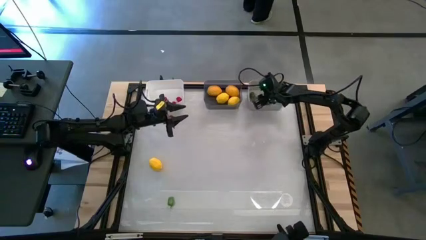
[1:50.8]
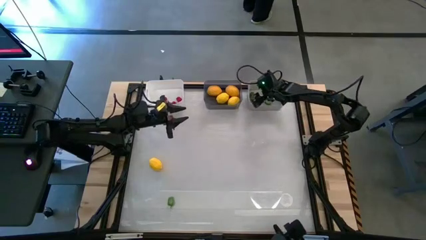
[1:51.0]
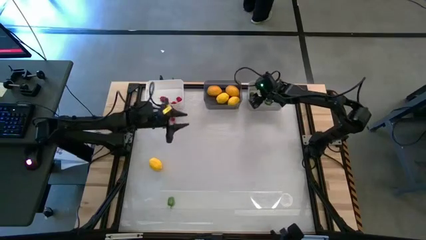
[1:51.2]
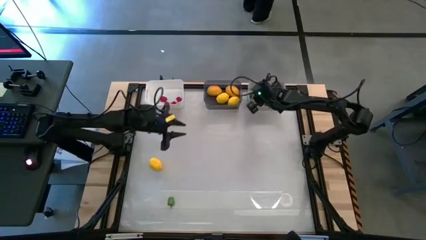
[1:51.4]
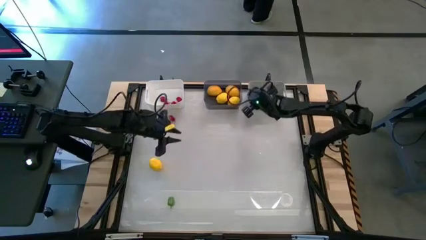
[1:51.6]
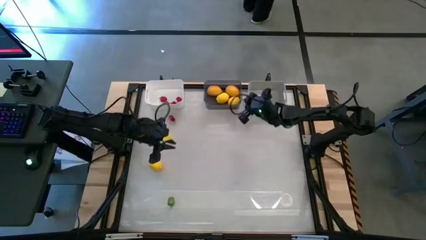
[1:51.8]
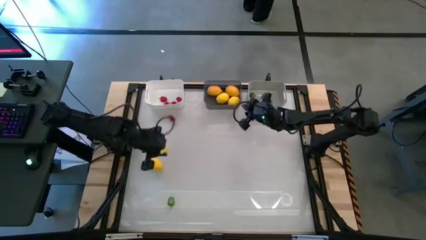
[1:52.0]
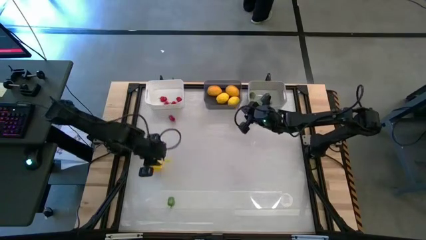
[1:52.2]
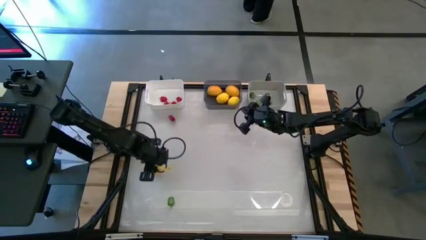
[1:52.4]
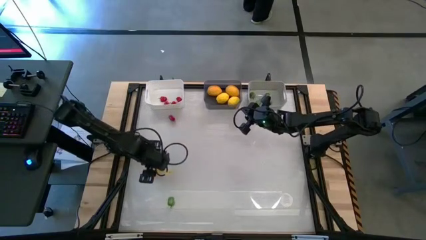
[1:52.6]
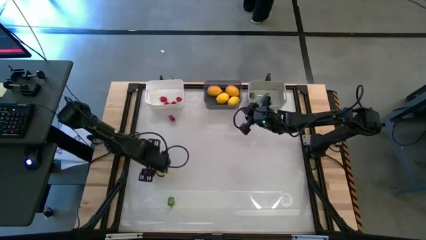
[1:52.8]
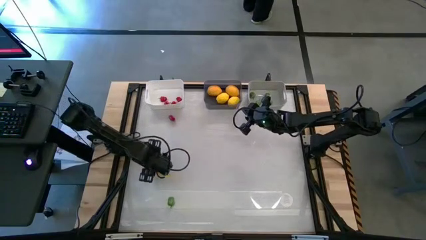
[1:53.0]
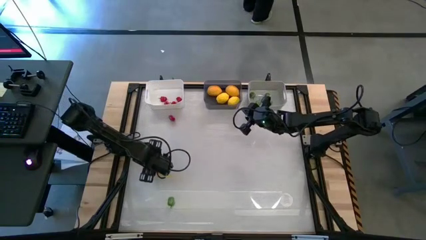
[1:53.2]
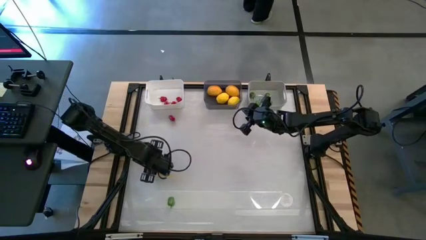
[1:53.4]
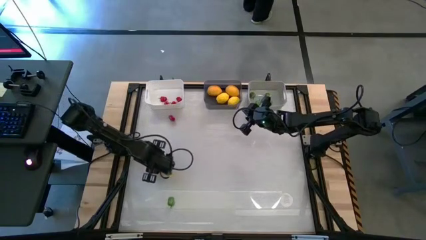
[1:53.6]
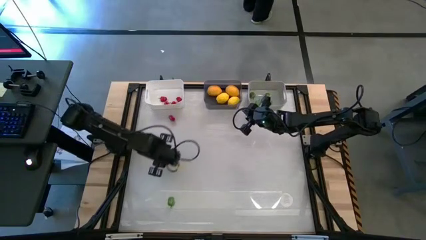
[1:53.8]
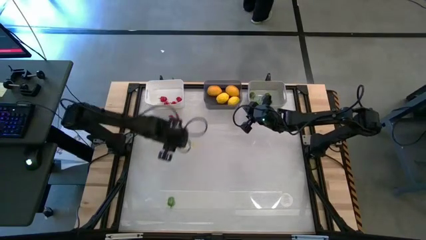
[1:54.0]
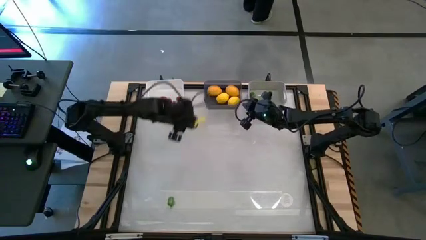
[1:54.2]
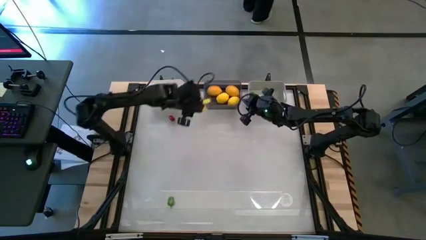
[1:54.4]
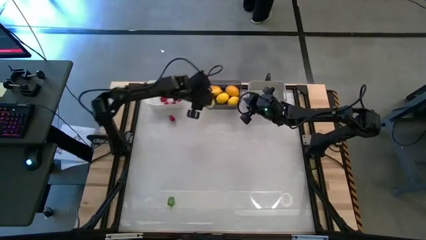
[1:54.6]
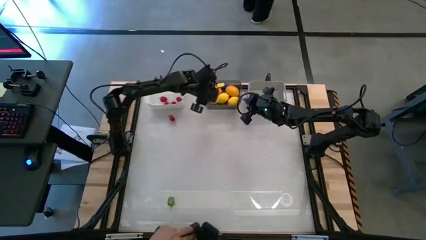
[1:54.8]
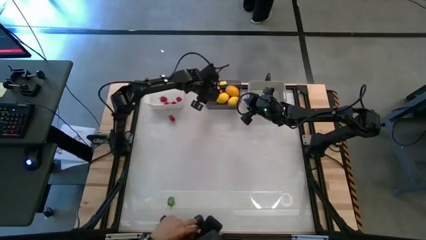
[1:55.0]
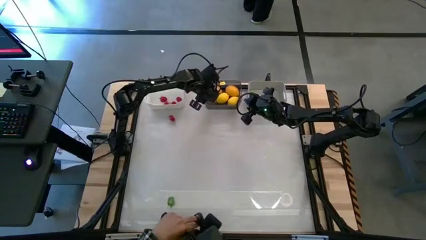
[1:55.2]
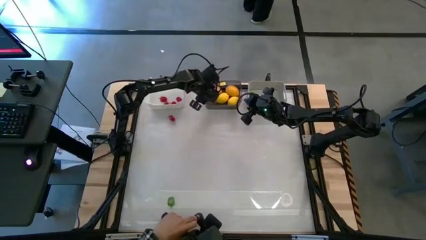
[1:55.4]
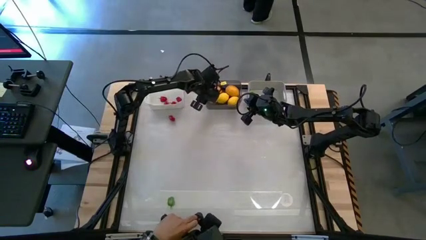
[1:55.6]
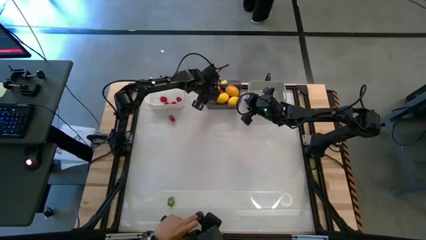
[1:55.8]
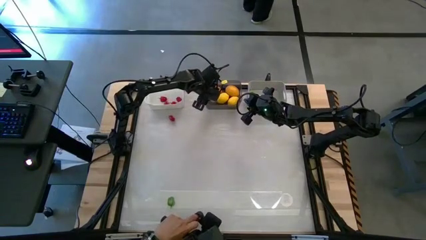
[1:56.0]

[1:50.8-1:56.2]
Task: Sort produce into baskets
Put the lemon into the black bin

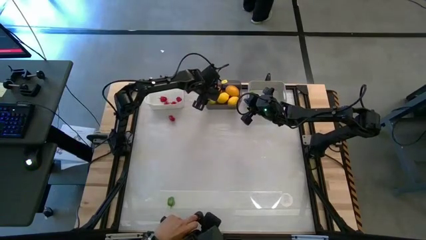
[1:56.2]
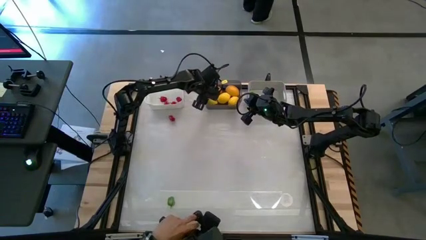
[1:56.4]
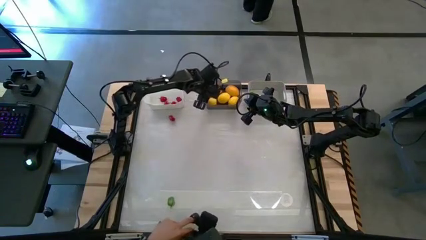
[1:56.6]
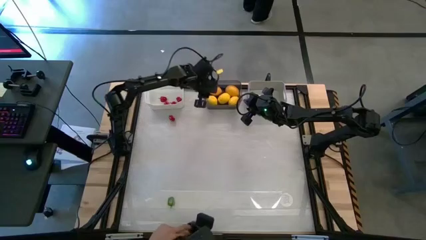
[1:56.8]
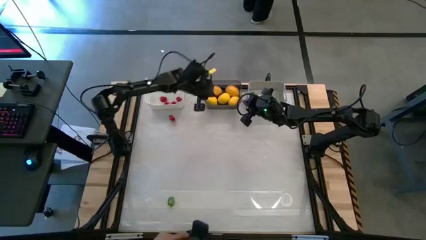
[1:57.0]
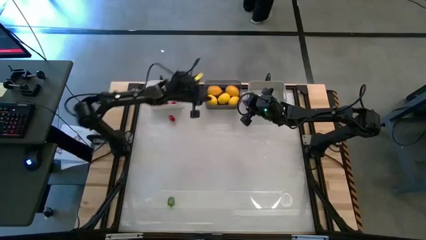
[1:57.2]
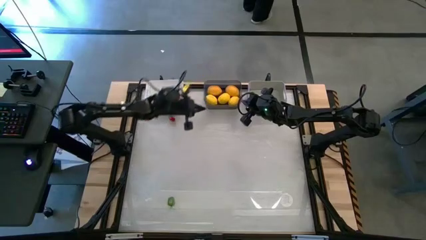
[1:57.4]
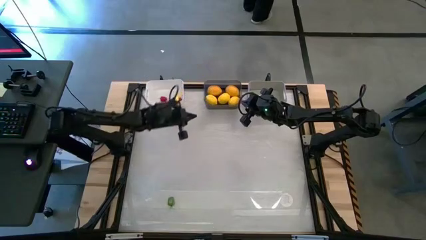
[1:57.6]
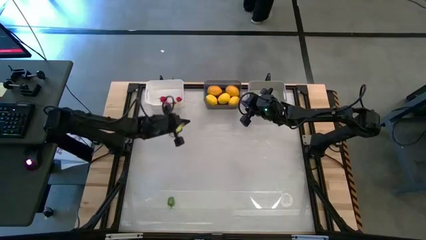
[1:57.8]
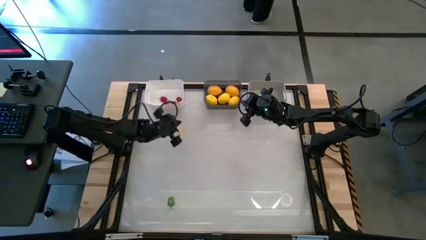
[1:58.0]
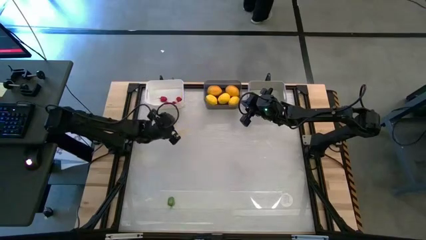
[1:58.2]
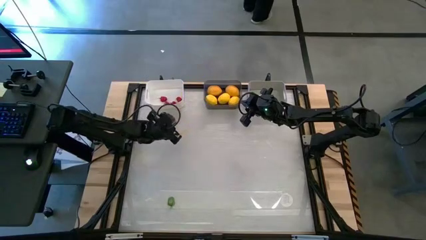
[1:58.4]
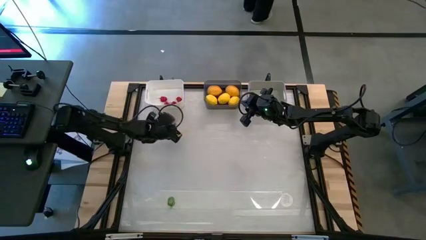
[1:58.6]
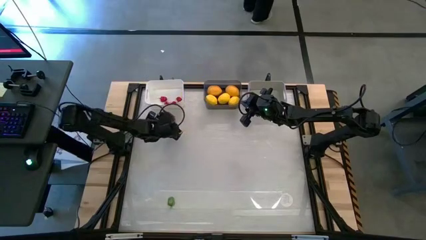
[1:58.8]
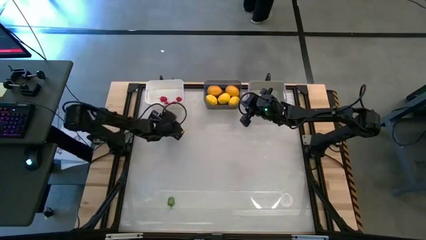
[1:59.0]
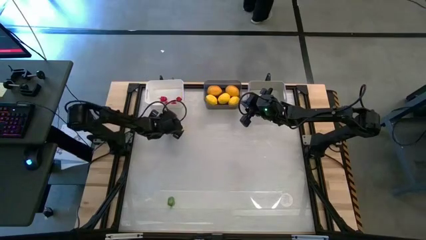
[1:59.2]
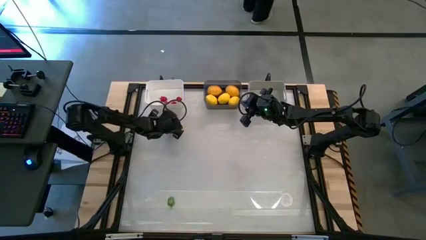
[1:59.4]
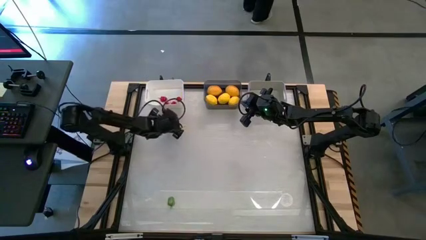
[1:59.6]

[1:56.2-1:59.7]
Put the red bell pepper into the white bin

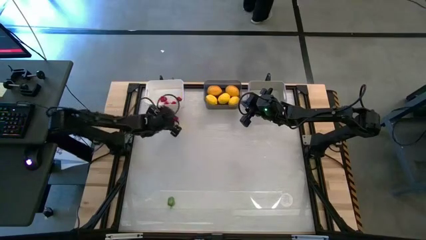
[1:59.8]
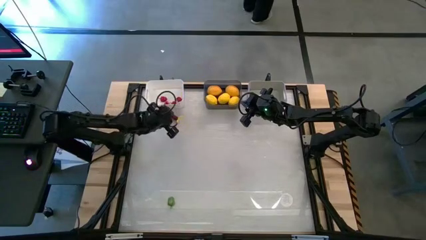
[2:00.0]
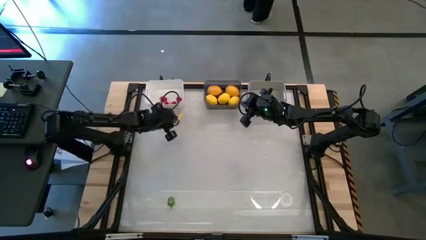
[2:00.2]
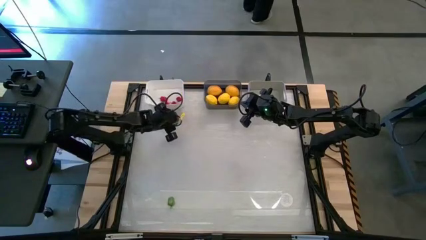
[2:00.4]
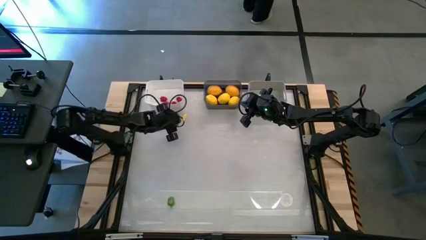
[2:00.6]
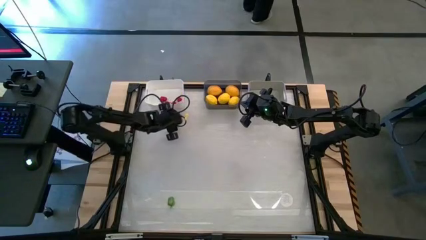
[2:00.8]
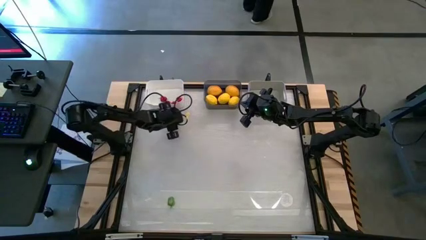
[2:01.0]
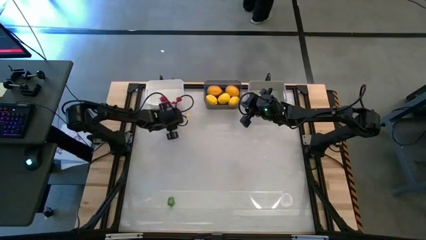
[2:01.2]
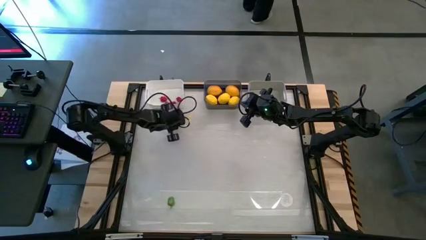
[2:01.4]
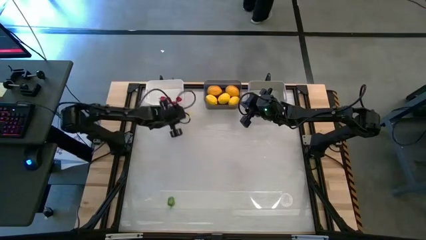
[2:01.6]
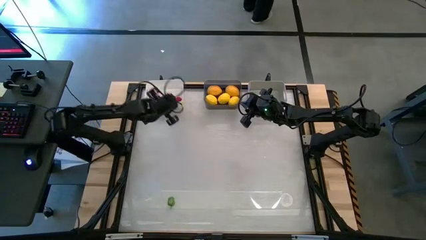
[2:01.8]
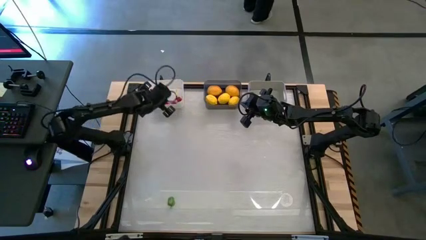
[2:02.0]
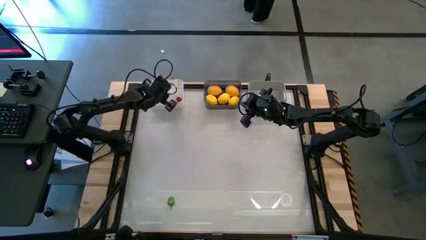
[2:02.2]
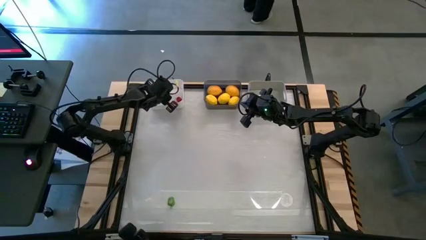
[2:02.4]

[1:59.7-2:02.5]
Put the red bell pepper into the white bin

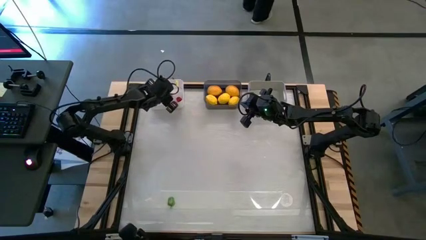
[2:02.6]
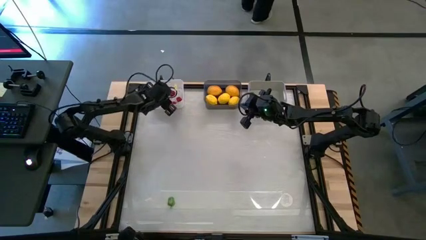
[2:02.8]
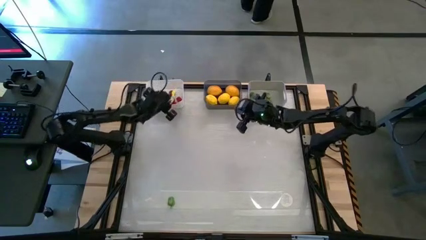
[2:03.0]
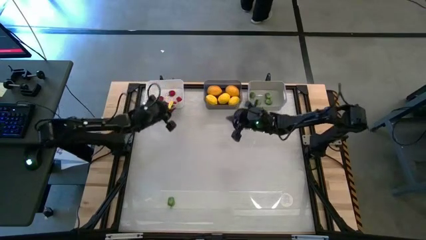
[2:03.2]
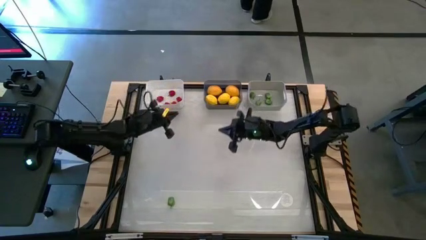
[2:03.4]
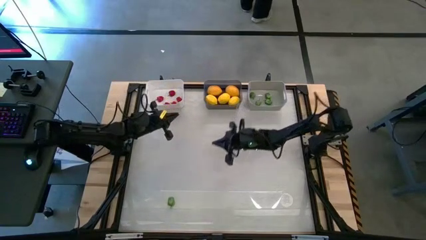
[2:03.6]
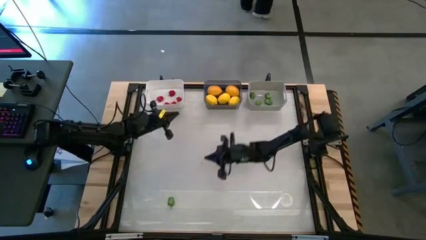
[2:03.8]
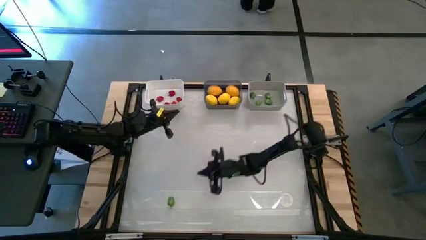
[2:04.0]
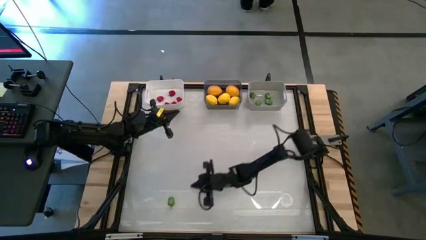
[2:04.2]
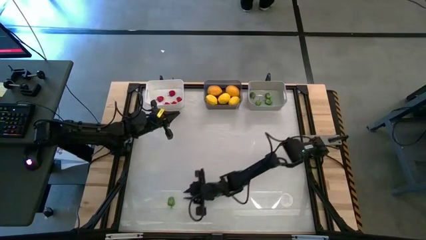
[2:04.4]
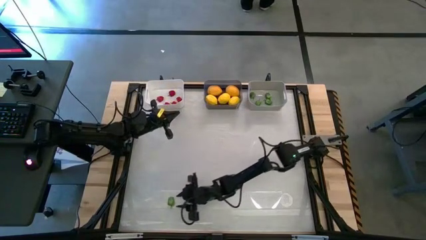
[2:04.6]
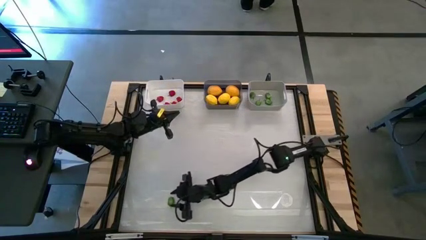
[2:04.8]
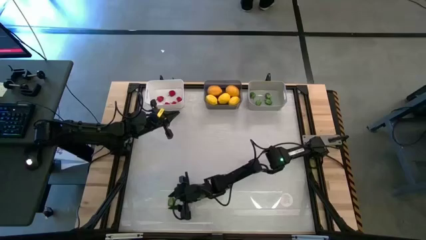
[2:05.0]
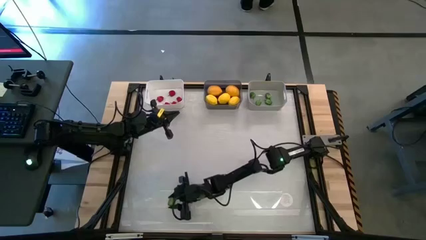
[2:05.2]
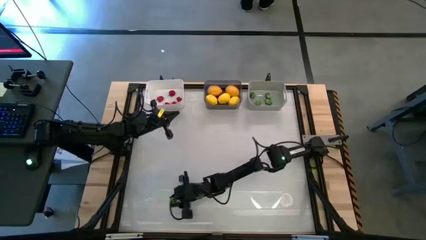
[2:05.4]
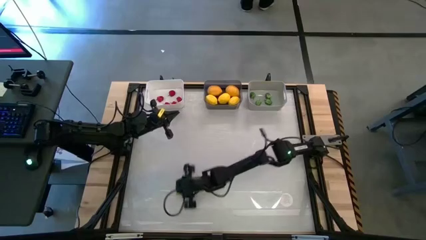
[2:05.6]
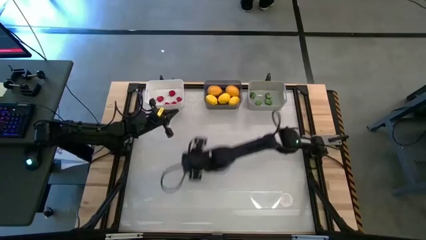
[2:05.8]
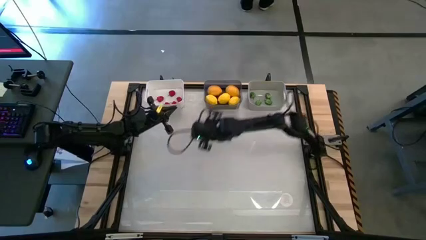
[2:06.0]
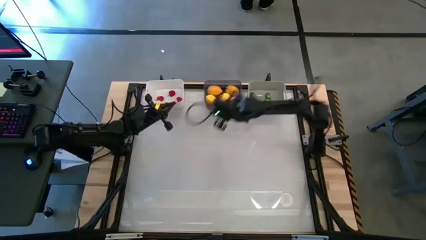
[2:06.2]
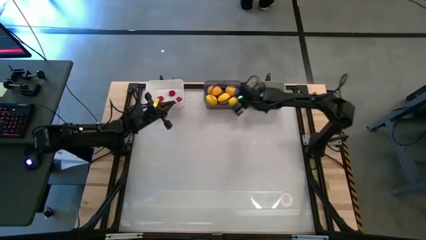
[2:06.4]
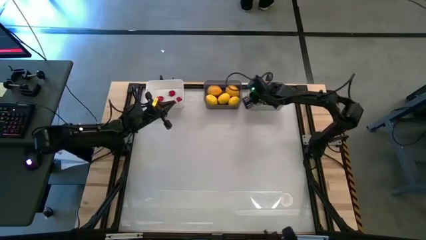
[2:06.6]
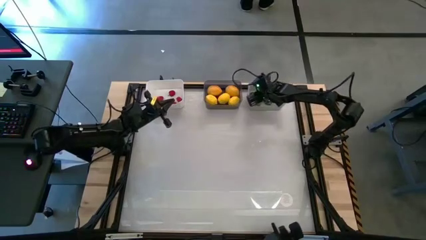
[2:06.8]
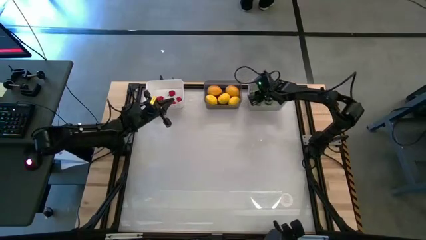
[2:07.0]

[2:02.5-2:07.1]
Put the green bell pepper into the gray bin
